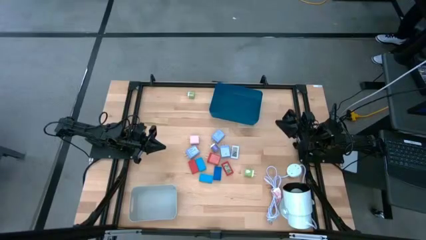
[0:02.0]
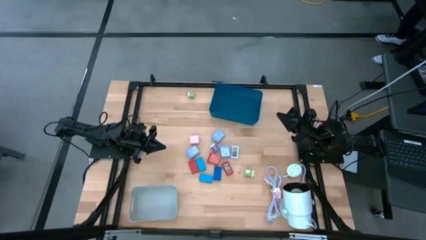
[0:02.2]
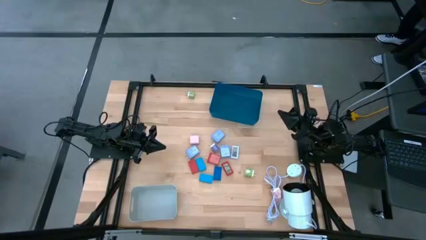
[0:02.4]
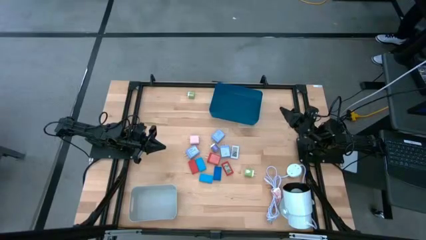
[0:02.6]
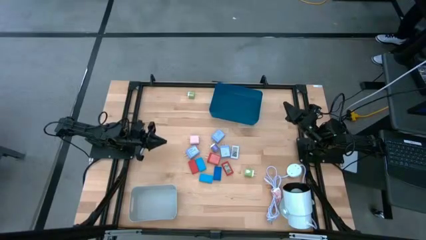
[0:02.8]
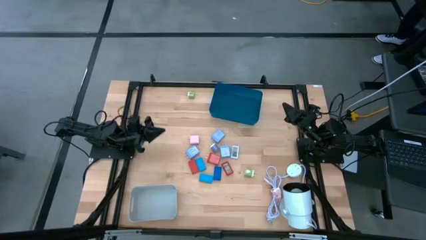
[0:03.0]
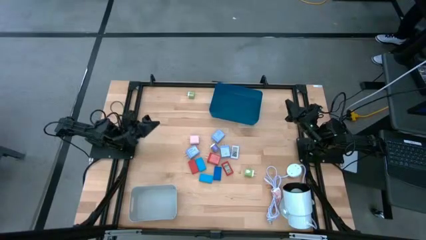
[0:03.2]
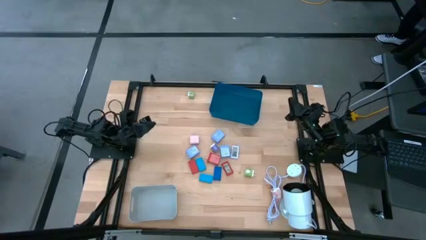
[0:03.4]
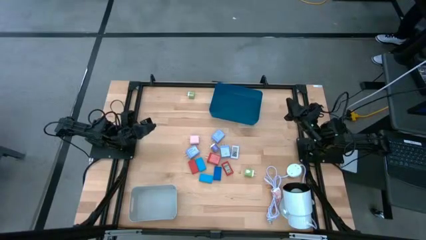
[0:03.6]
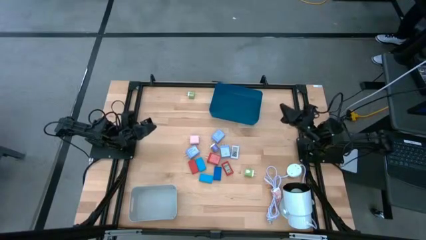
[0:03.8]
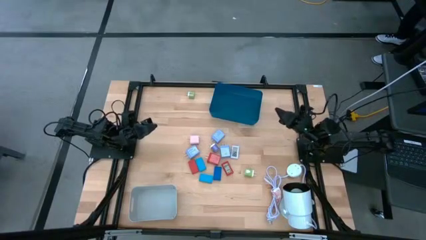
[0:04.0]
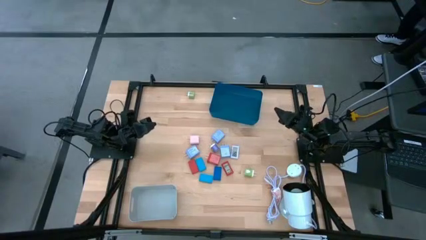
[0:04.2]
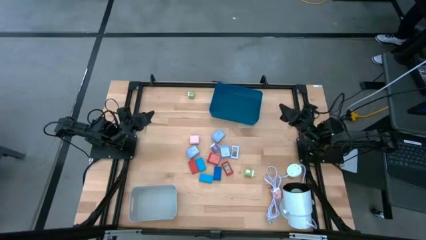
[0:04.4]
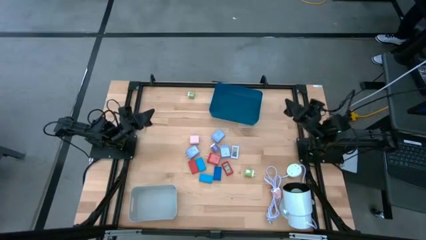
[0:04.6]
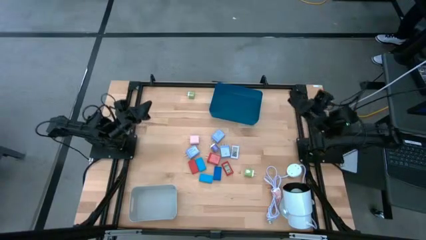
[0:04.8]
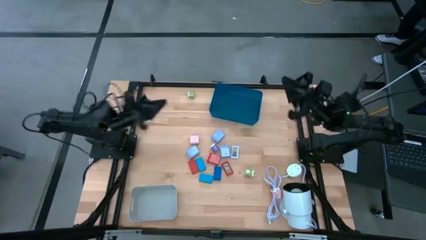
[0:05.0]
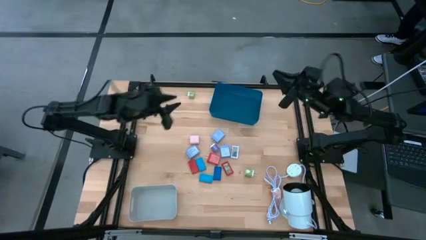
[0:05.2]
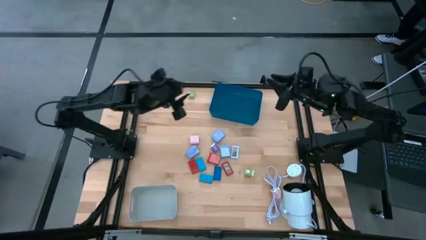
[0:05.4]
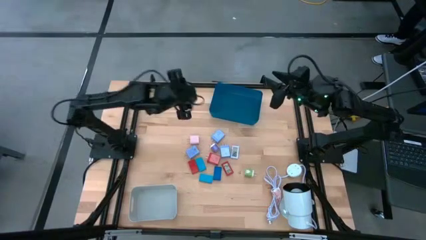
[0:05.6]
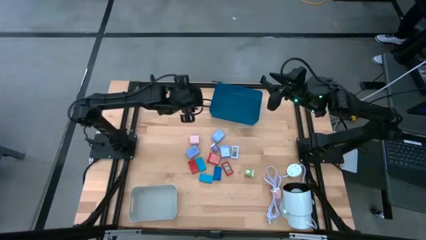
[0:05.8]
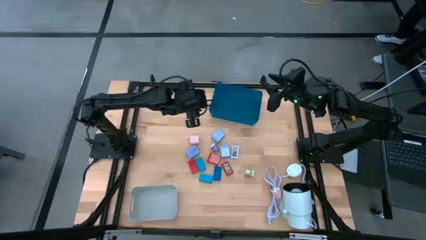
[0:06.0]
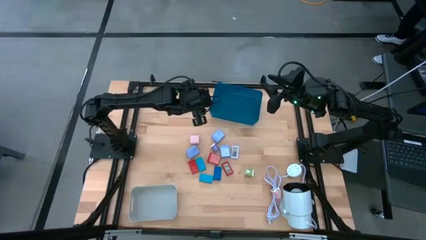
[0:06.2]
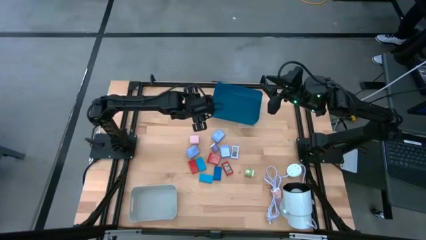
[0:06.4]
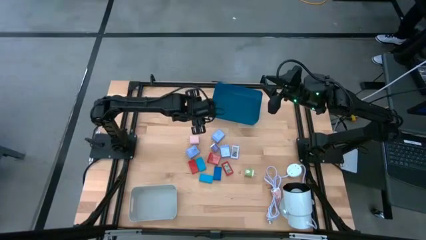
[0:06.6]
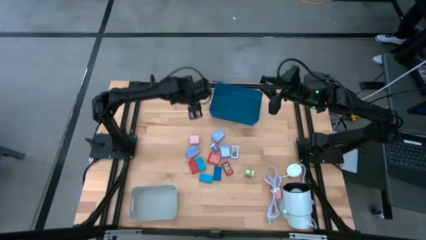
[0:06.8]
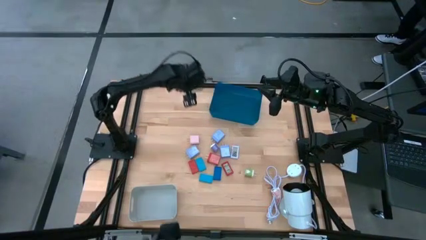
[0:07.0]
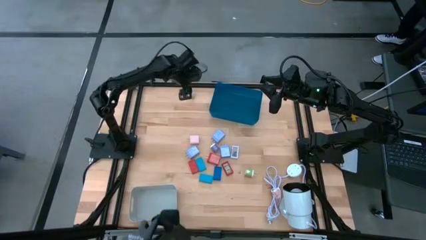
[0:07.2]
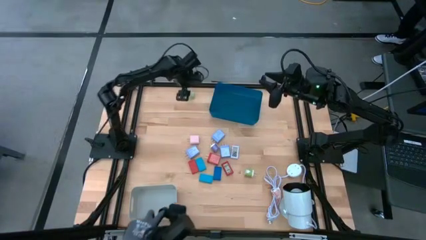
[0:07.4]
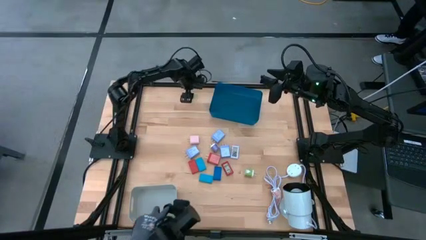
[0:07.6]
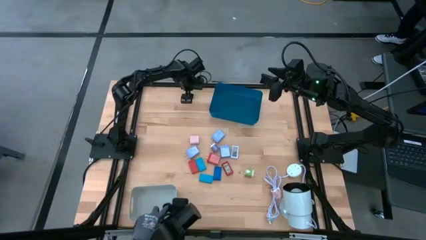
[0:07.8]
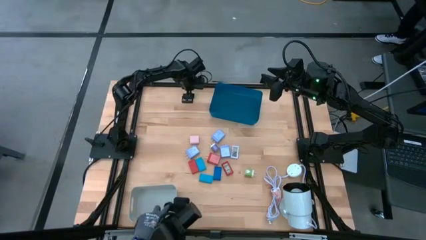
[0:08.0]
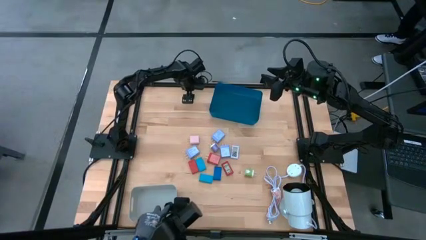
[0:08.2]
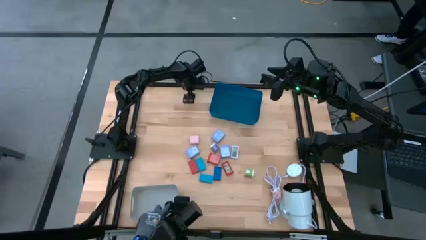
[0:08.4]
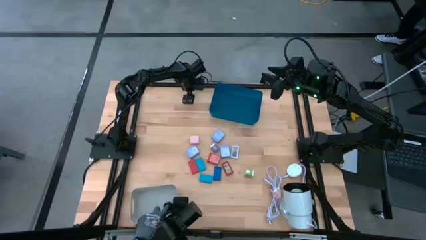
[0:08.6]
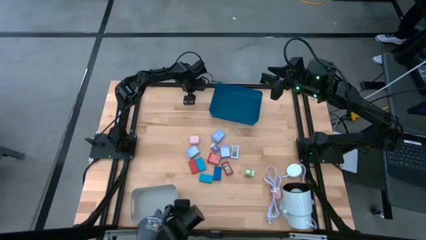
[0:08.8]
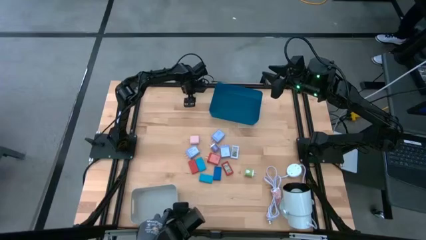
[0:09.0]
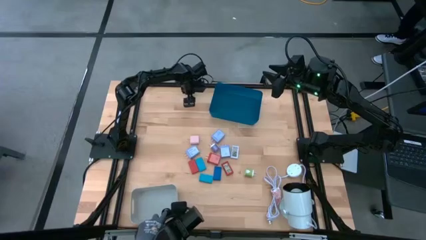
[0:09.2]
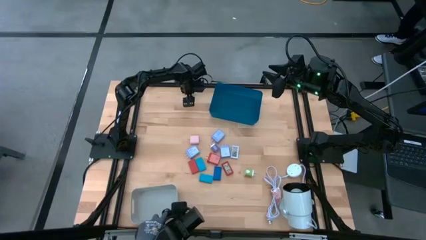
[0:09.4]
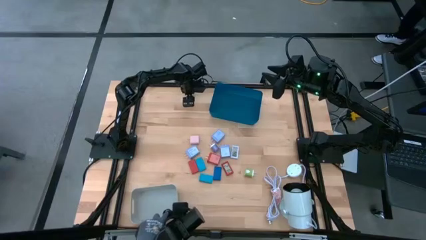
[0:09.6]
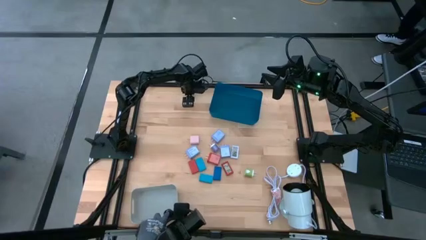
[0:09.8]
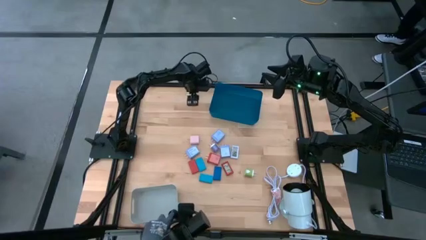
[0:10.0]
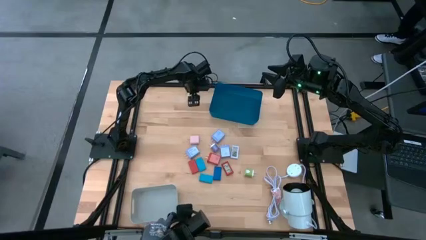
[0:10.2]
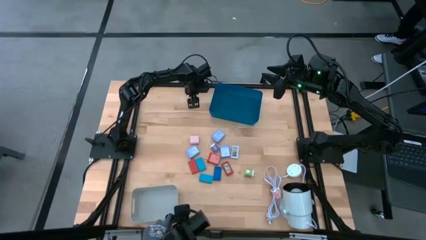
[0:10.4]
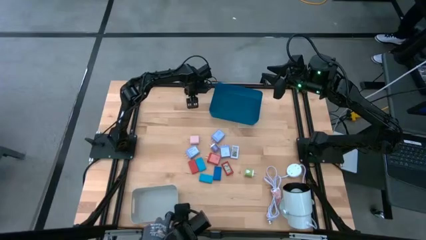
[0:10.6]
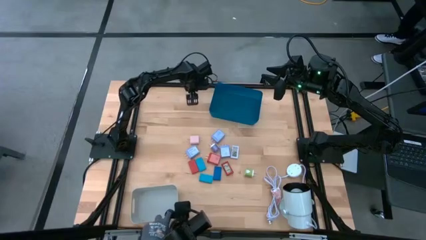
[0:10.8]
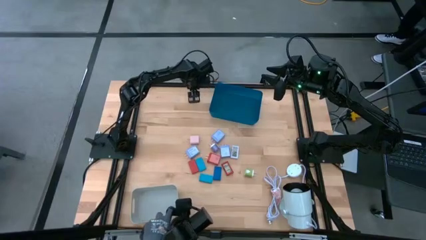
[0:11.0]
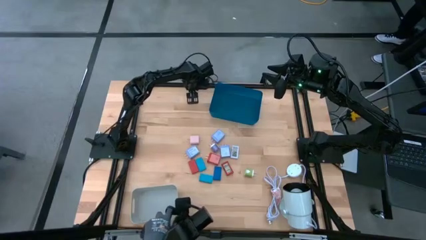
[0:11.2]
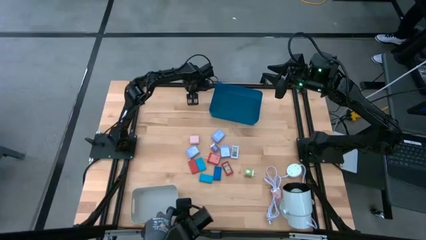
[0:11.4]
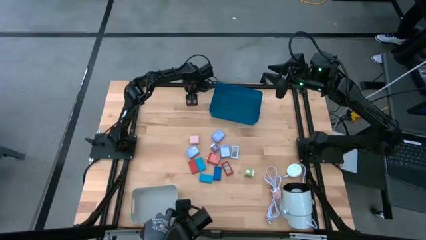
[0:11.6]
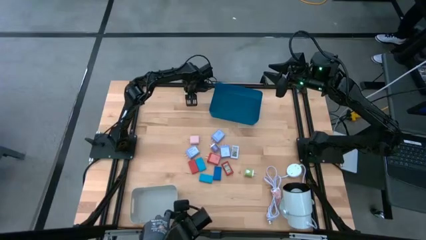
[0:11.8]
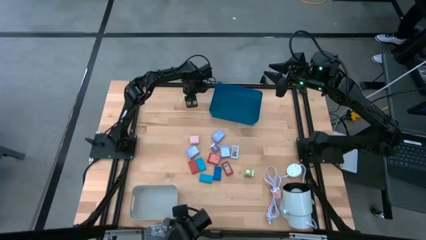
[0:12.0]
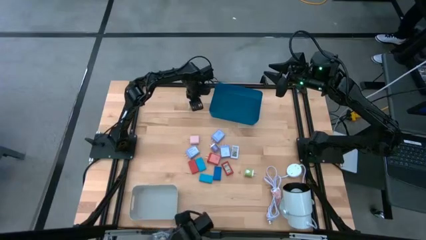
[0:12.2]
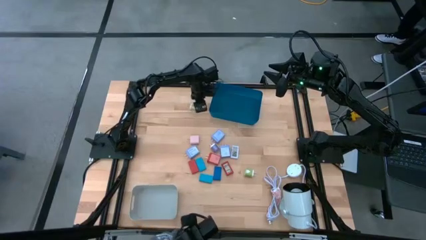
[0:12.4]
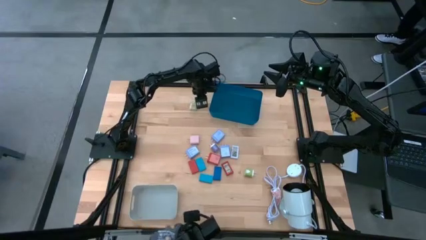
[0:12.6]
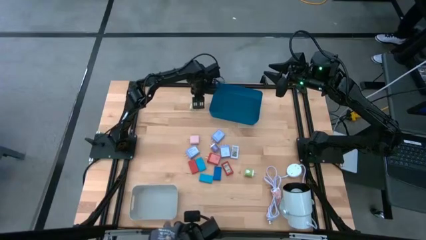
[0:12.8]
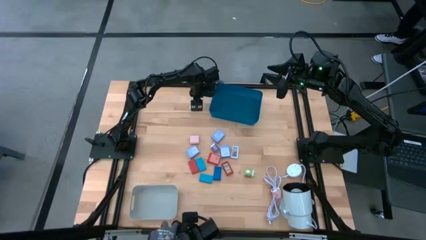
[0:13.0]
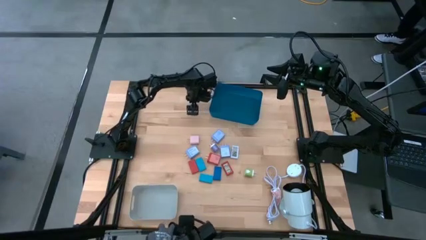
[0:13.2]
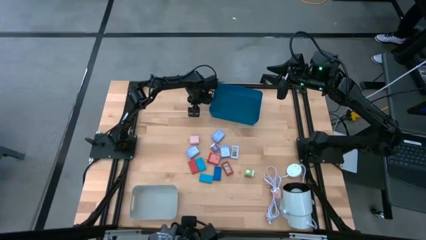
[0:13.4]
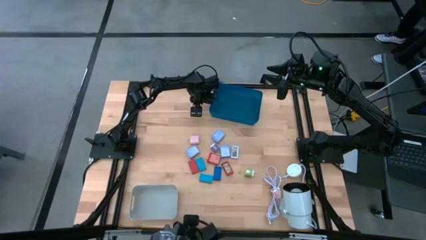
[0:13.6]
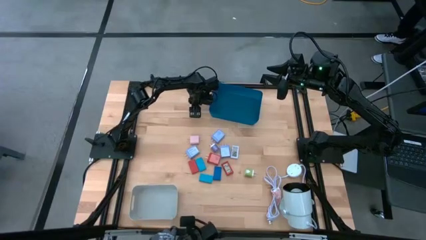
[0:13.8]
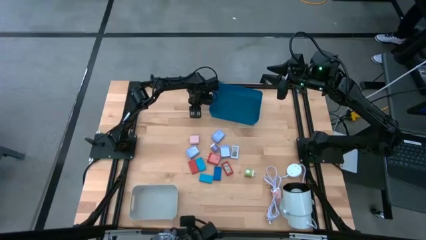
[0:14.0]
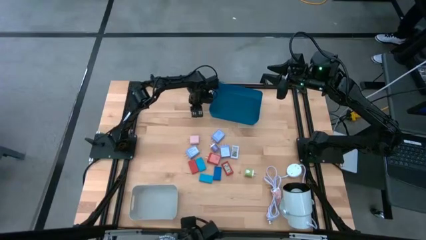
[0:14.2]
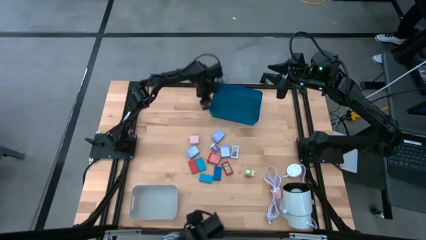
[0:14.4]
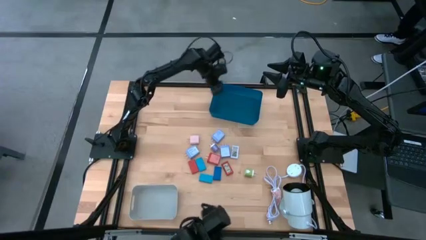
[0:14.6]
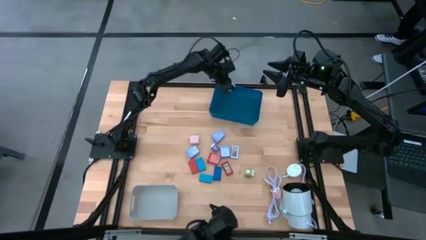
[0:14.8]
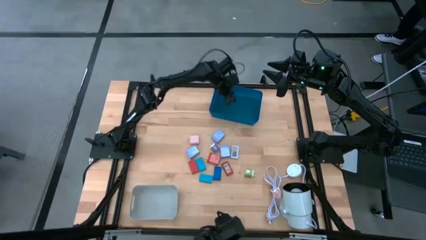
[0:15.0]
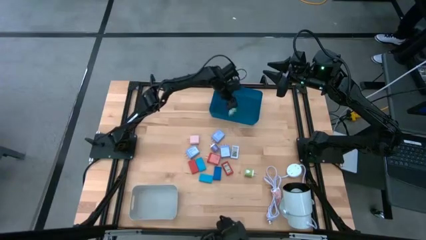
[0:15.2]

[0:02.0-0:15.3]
Task: Pick & Place Office items
Put the top green charger adapter into the blue bin
